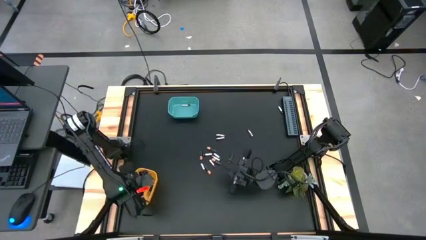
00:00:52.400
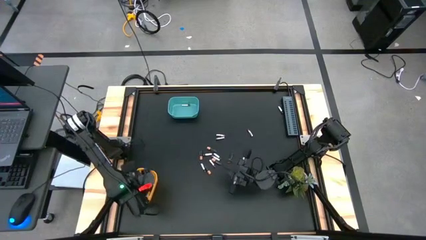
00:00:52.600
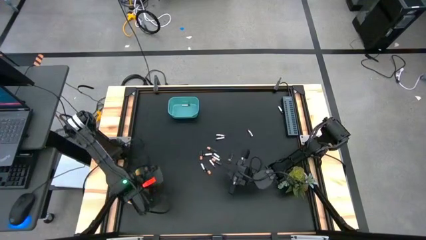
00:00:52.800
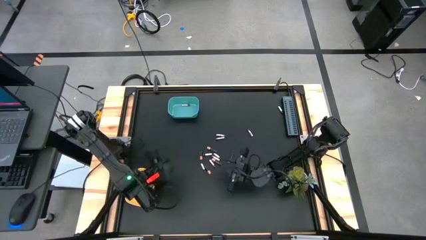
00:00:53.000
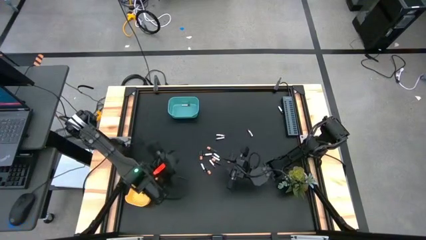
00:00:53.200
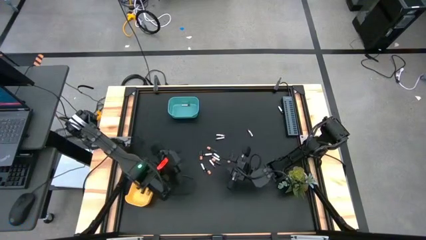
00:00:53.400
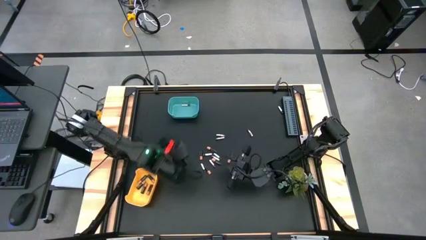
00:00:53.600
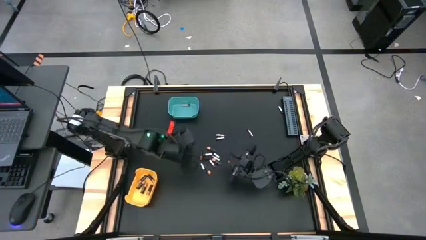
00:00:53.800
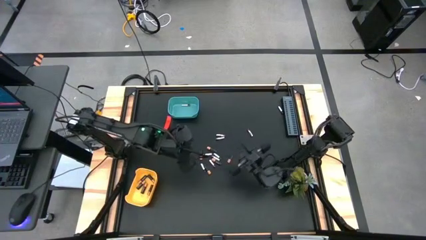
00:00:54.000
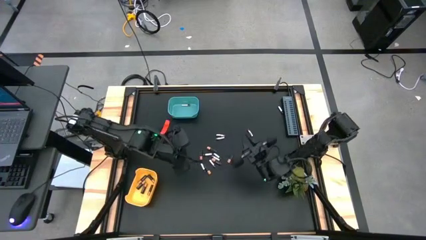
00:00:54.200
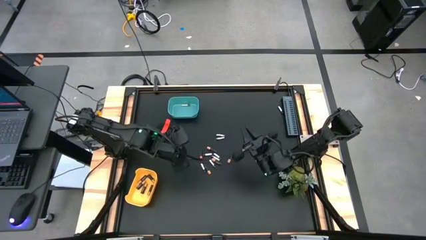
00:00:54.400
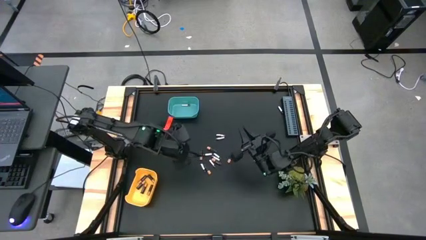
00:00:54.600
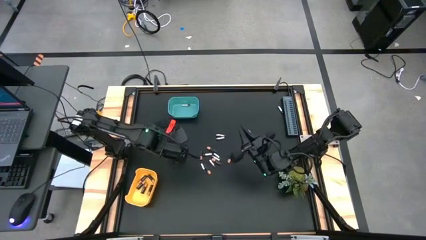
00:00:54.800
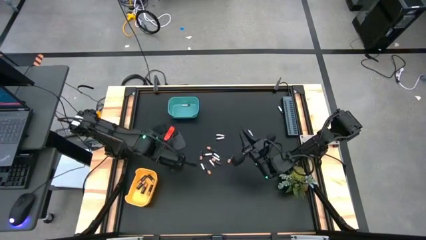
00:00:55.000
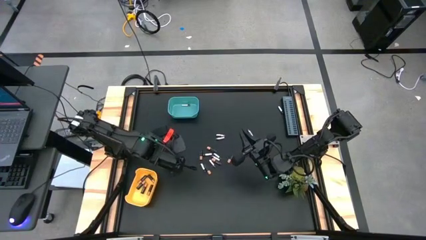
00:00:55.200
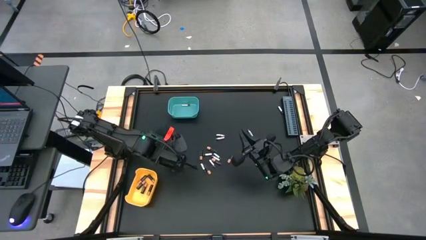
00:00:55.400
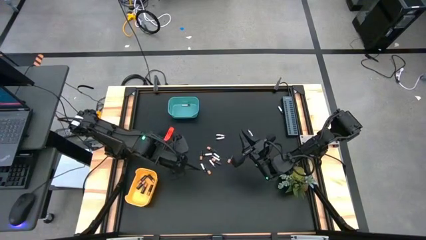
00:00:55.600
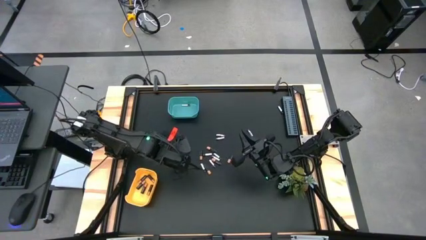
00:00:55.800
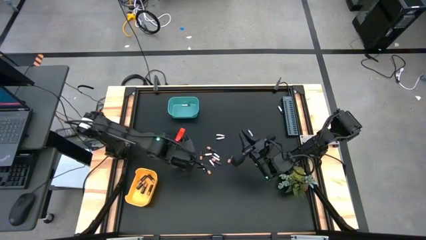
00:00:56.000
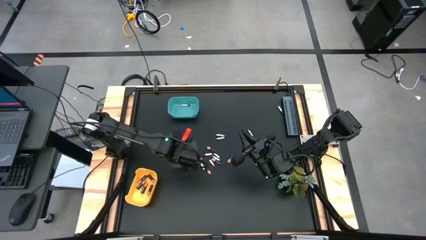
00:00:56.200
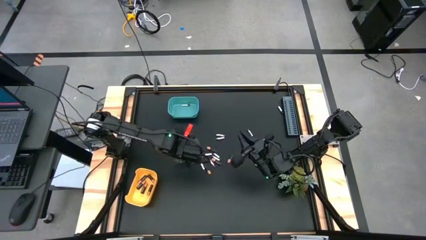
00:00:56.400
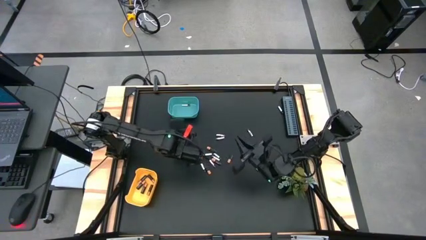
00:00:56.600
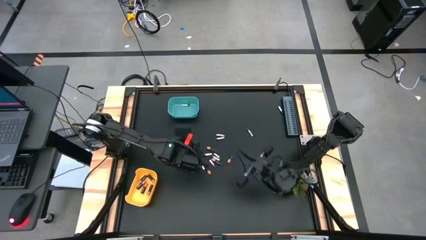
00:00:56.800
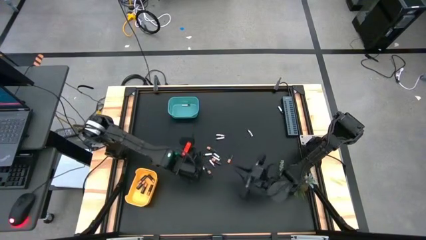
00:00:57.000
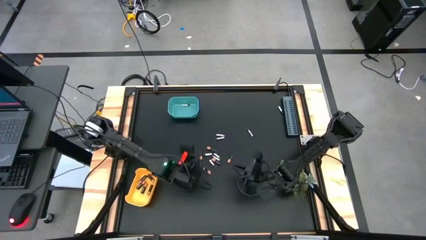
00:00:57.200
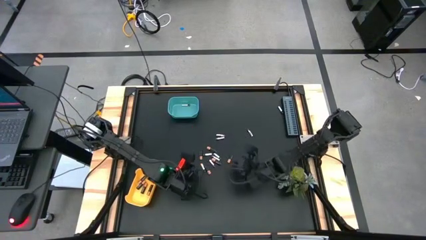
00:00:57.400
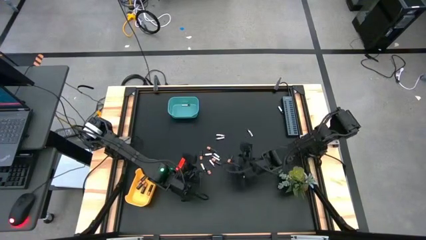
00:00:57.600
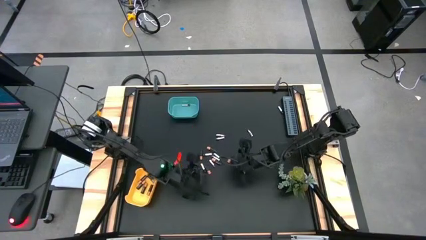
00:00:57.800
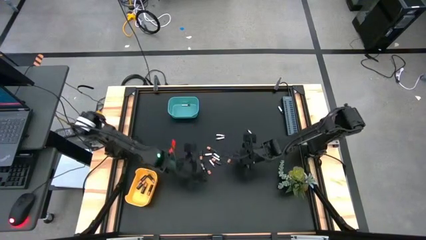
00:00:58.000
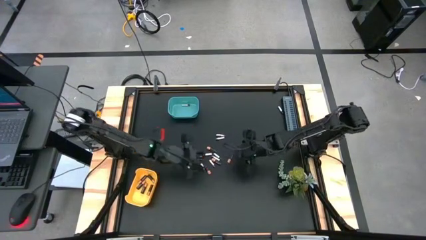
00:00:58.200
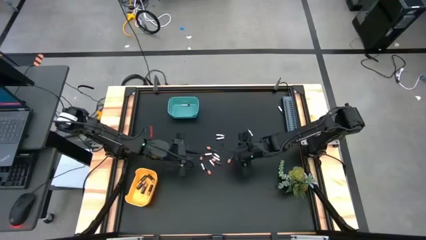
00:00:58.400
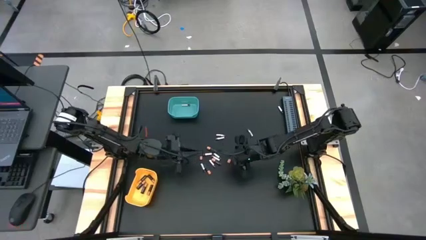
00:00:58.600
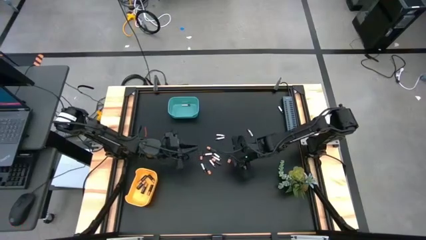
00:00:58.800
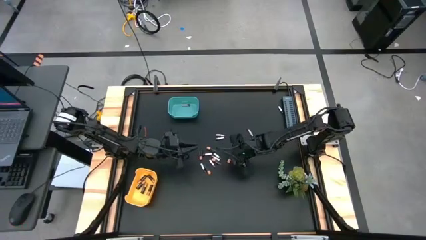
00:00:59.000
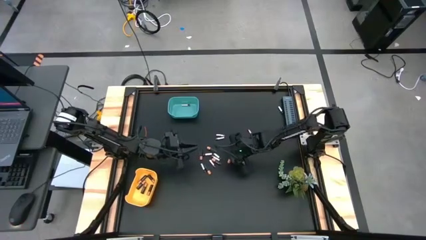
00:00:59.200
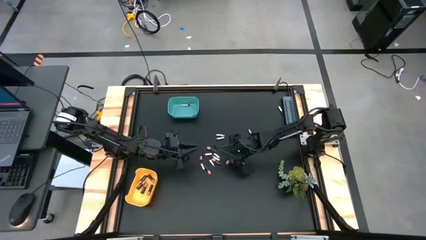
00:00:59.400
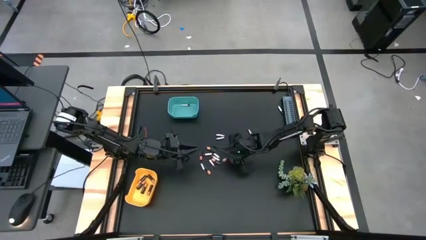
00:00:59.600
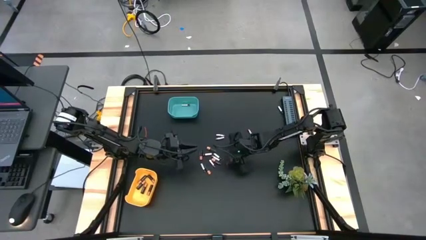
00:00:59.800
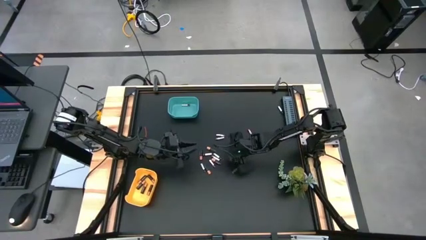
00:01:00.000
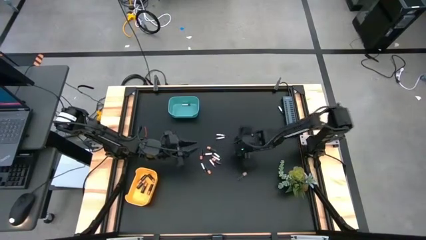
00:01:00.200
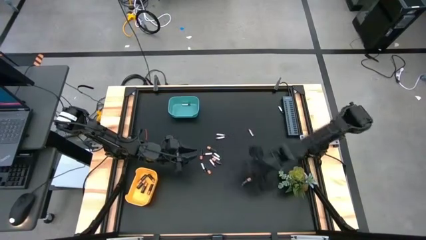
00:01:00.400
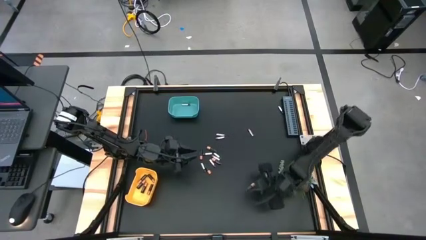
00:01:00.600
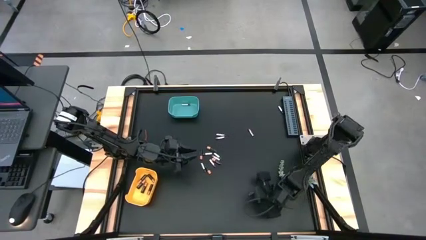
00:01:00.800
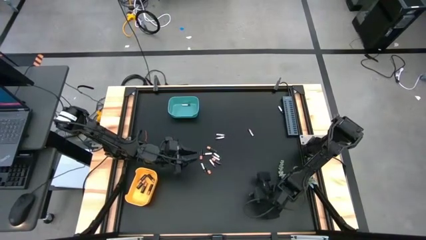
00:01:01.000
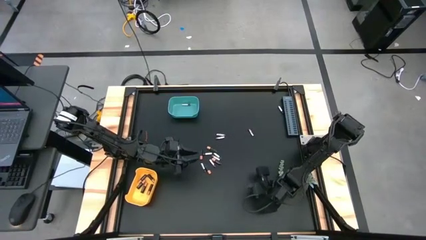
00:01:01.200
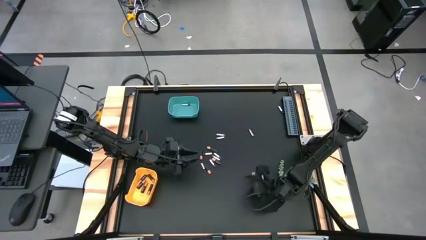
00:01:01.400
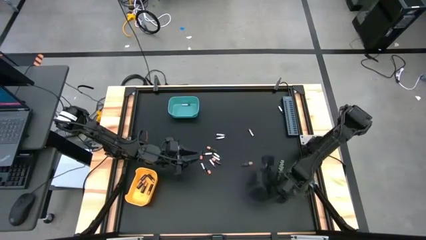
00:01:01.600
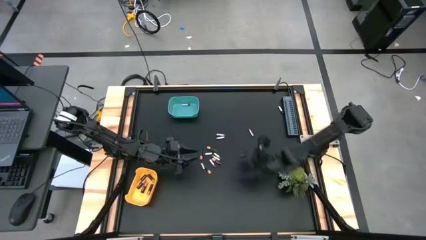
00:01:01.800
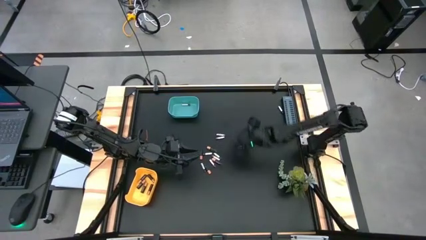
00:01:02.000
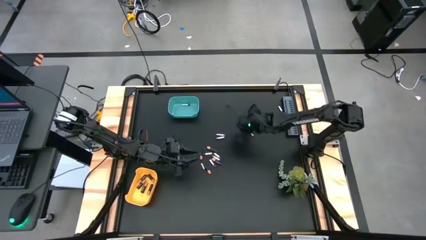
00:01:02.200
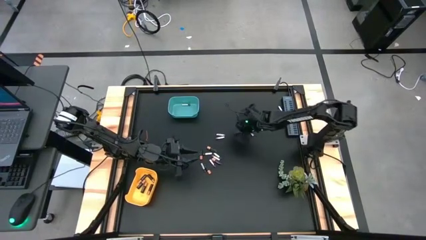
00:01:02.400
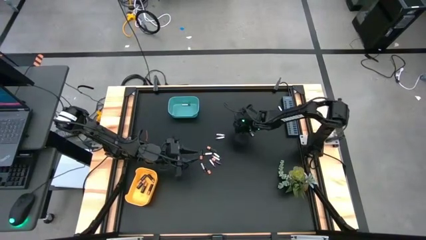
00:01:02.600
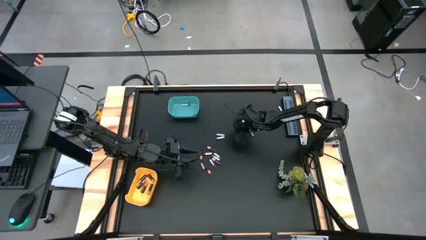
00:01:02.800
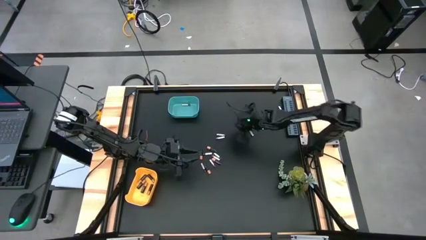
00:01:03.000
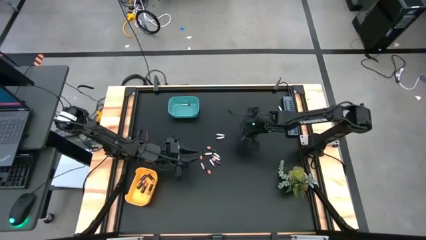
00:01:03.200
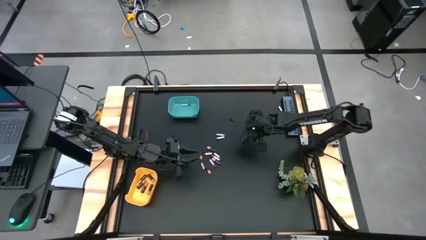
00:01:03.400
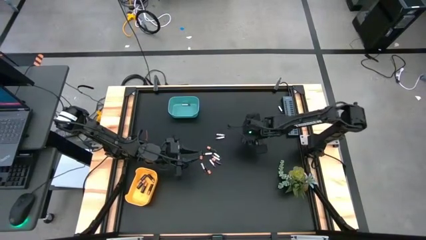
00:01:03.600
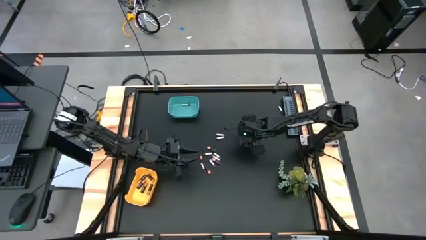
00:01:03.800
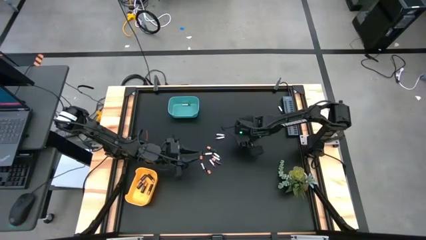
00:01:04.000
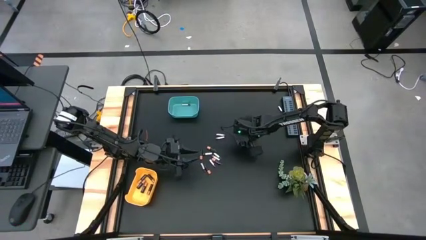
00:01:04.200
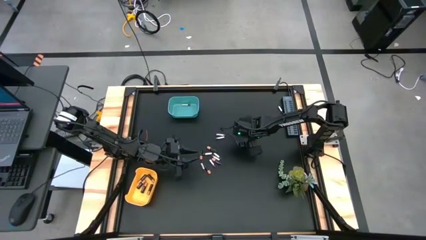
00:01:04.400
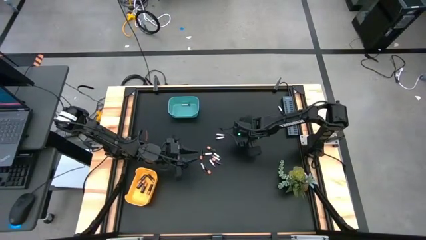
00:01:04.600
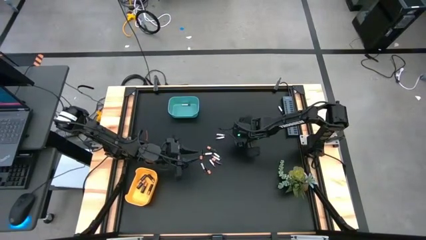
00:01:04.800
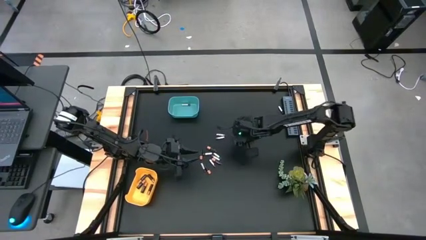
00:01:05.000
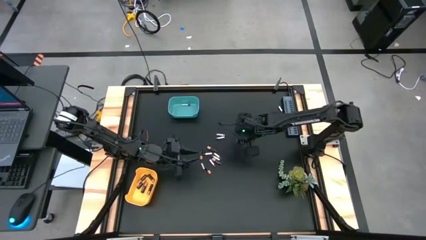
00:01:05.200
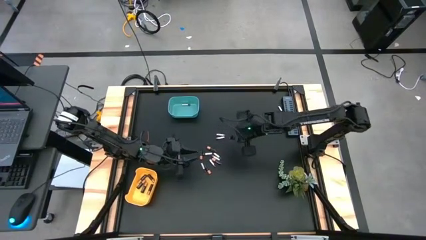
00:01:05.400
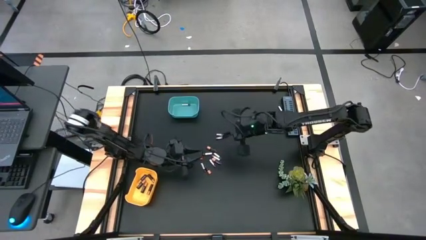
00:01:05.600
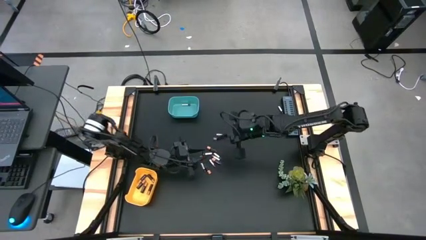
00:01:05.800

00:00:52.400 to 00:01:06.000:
Task: Sort batteries
Put the black battery into the yellow bin

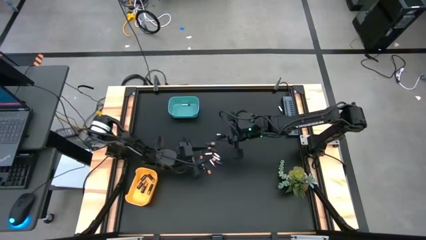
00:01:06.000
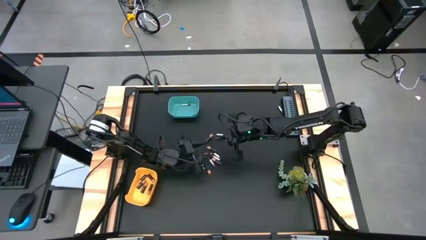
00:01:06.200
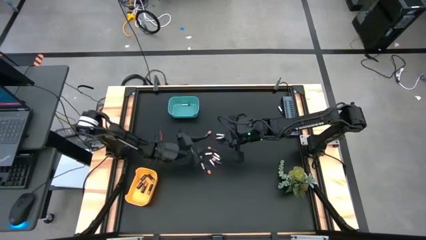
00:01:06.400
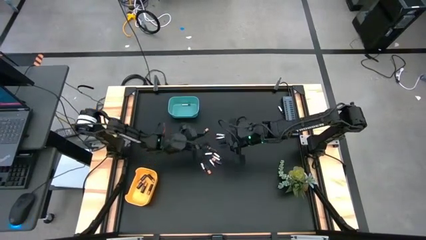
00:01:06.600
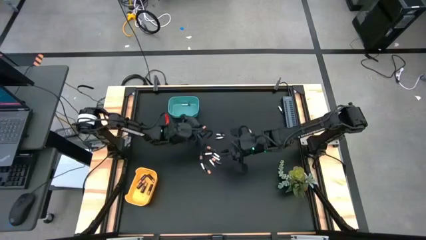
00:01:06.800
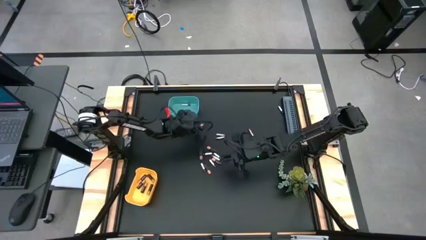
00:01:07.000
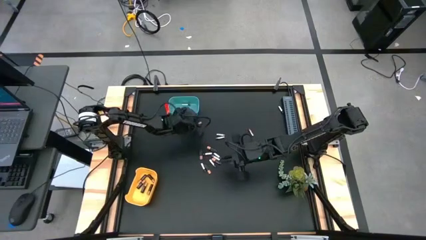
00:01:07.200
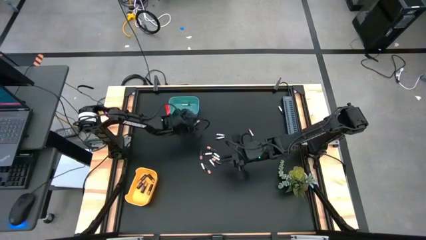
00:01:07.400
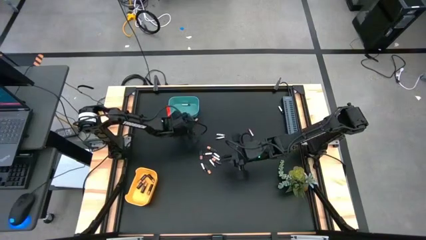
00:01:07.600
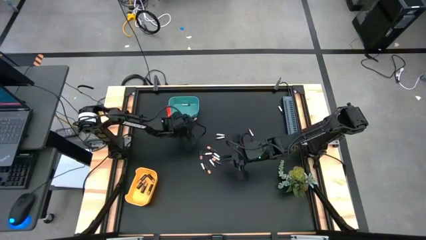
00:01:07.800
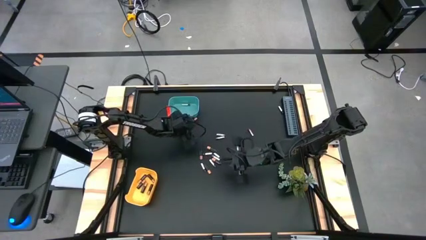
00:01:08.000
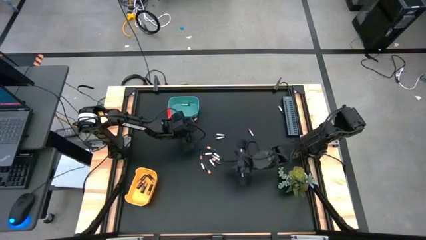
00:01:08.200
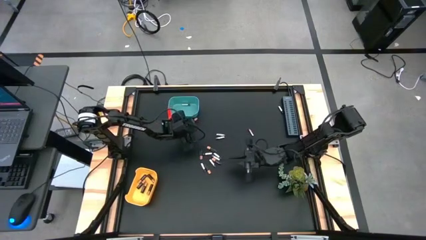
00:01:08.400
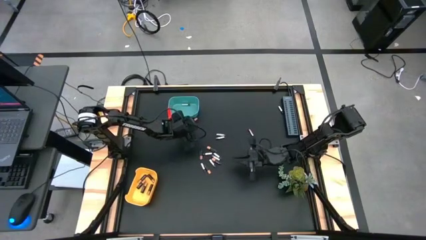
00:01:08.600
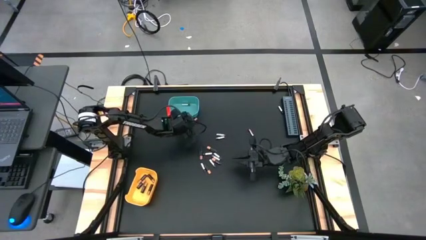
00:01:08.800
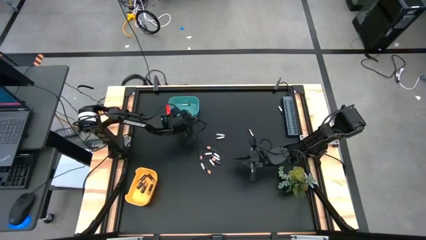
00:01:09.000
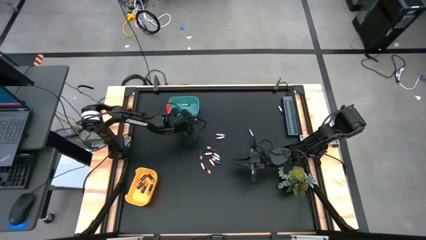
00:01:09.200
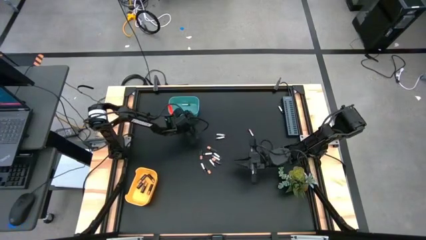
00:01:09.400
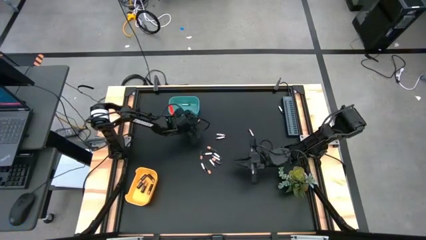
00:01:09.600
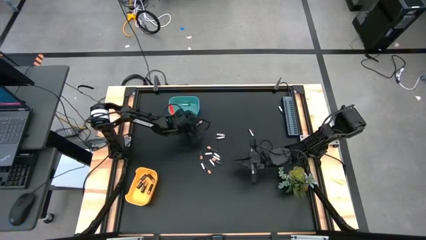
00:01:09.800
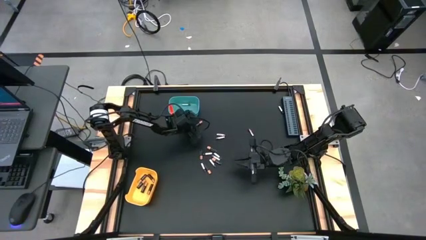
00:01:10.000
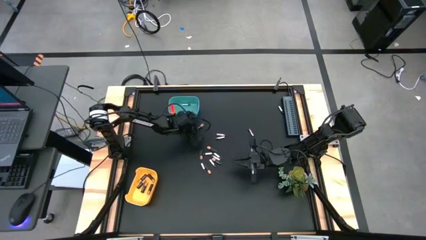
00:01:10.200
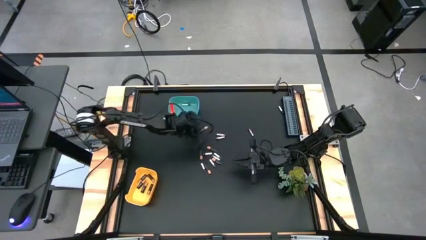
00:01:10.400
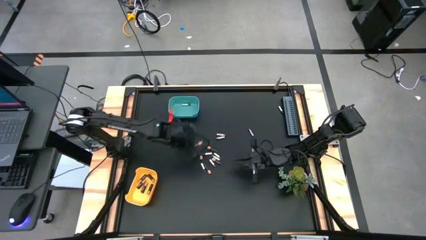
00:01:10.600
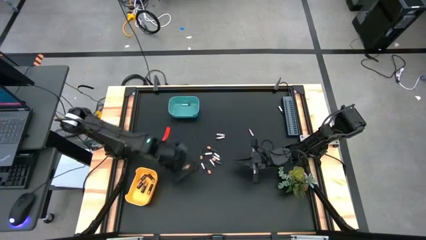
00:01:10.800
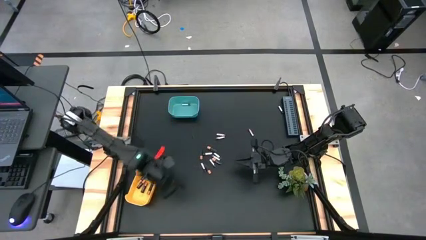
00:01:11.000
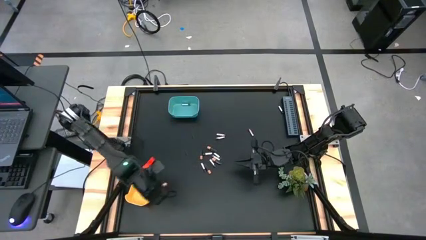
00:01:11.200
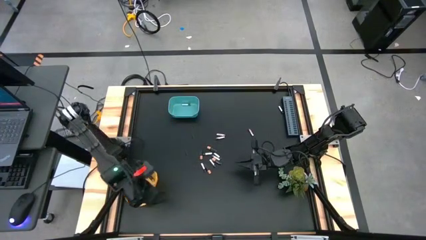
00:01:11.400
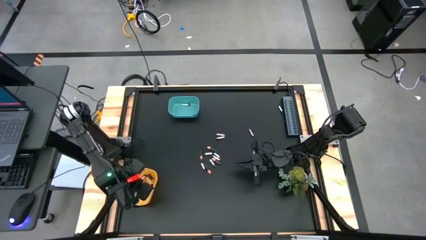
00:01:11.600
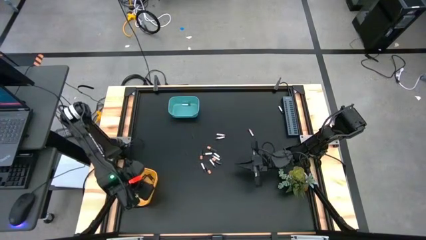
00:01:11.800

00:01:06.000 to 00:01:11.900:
Put the black battery into the yellow bin
